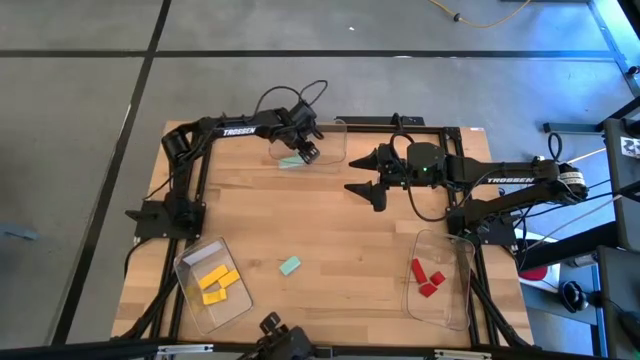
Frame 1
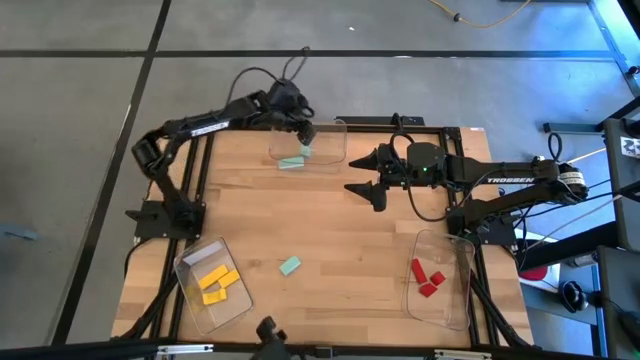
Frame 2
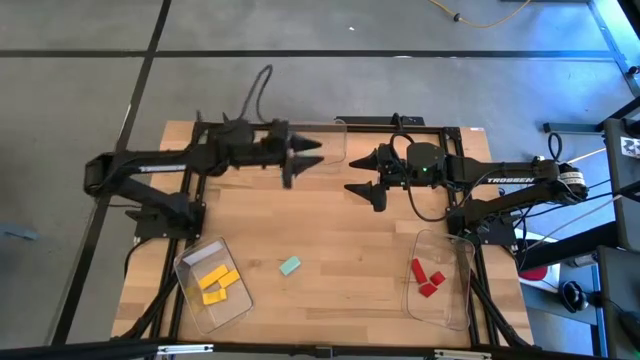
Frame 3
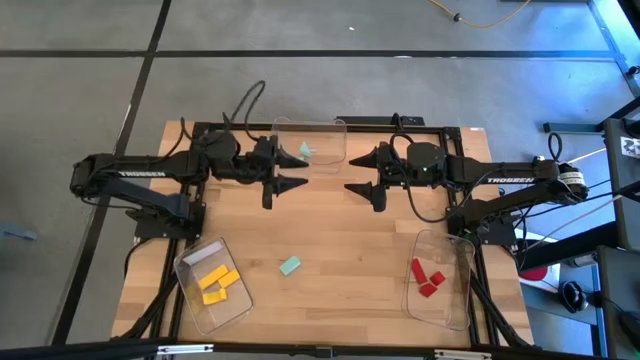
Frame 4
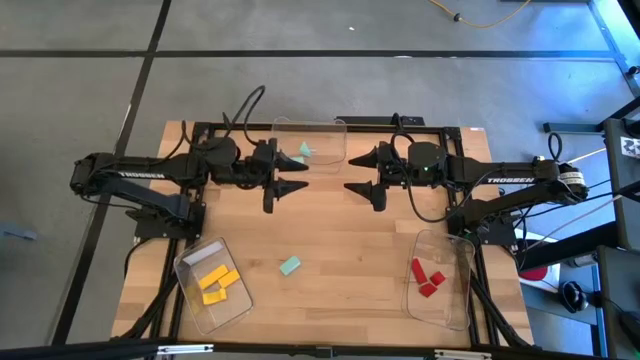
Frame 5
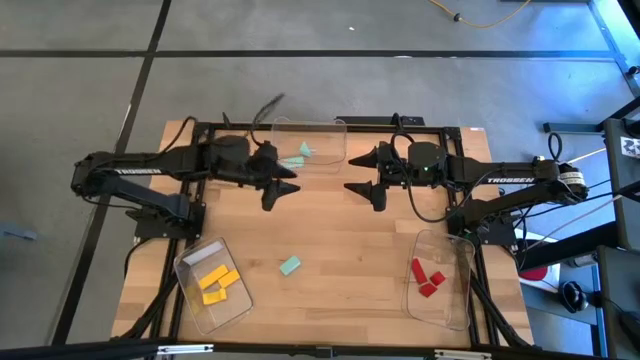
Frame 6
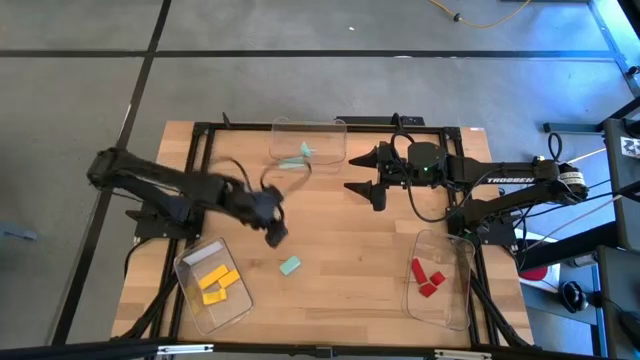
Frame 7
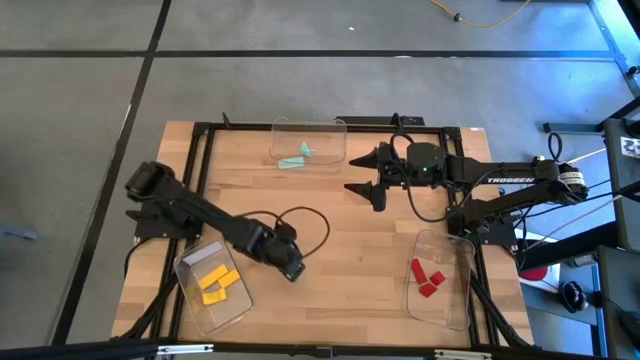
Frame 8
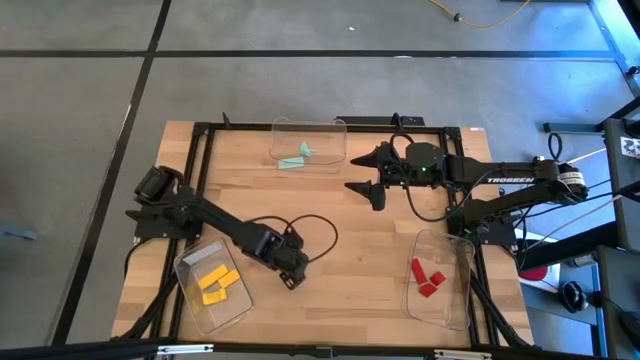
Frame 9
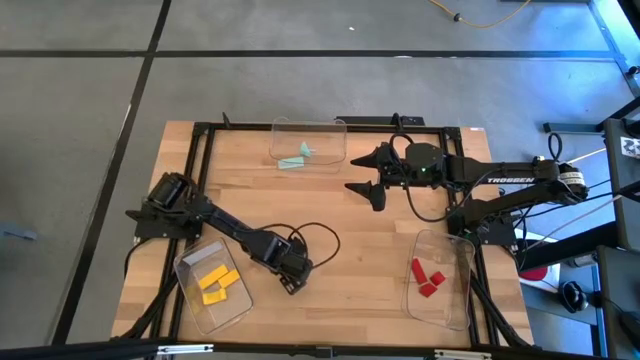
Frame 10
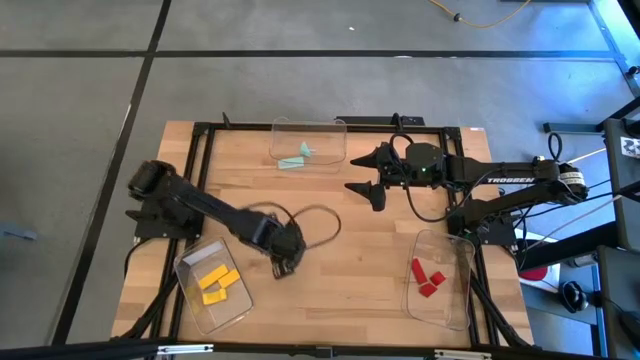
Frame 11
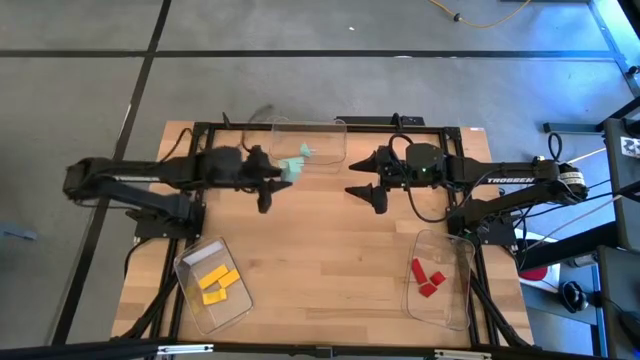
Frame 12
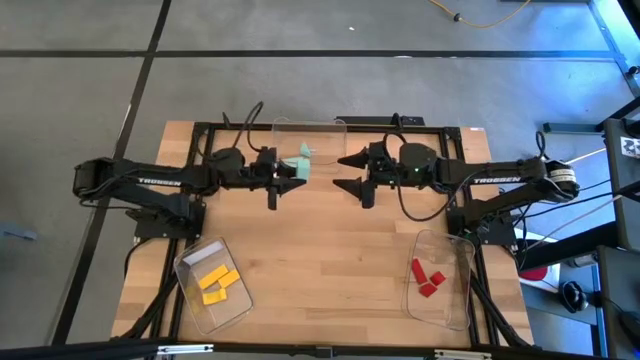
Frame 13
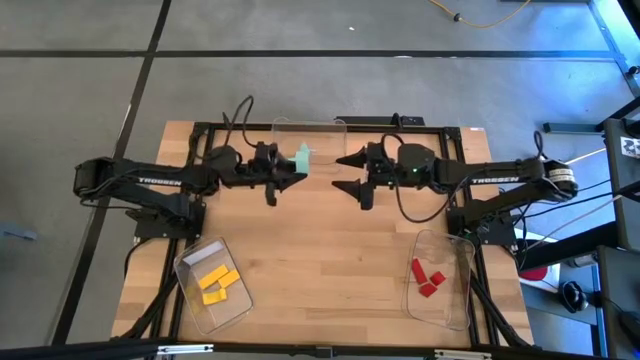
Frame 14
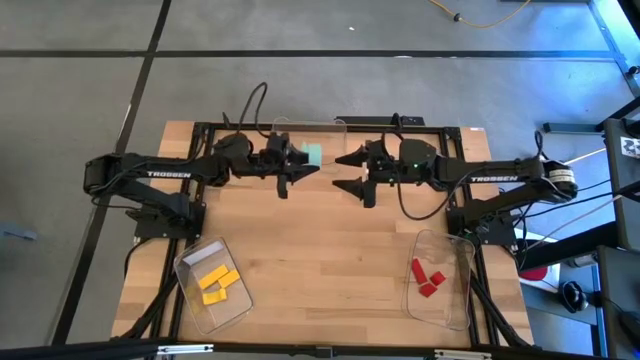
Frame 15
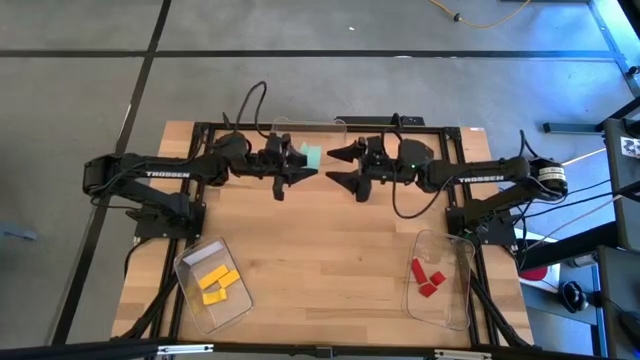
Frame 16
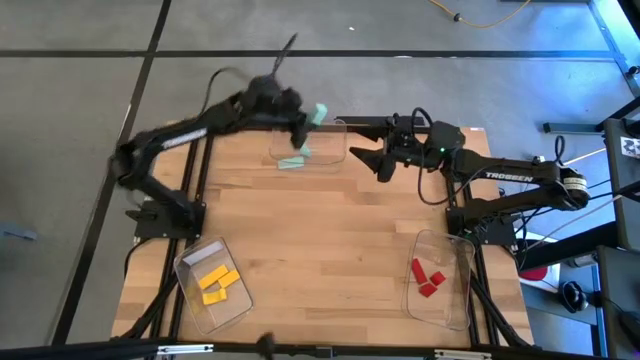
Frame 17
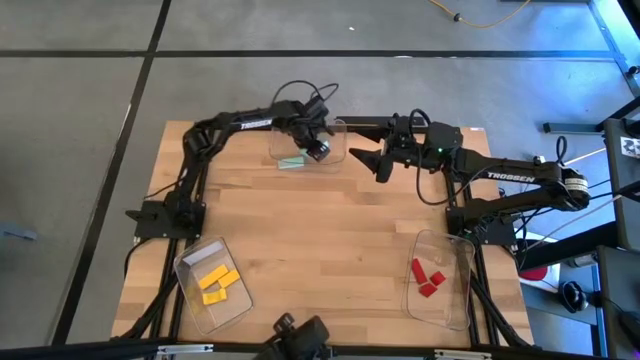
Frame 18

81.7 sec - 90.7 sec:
Task: Sort & place blocks by color
Put the blue block into the top center transparent bin

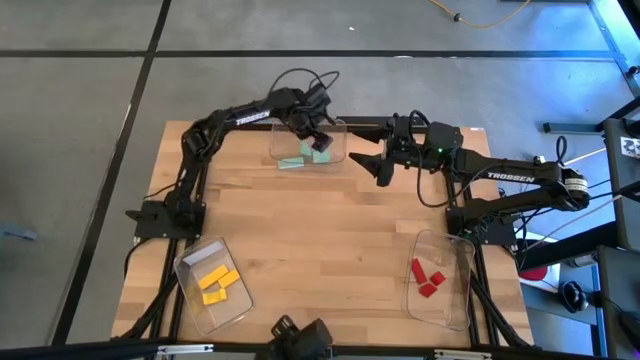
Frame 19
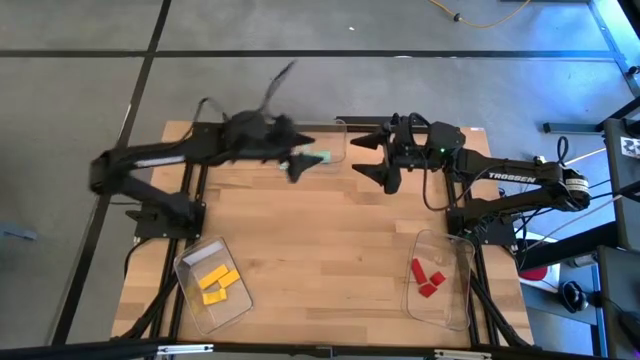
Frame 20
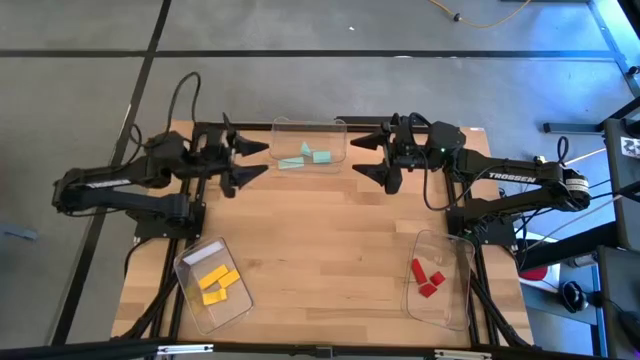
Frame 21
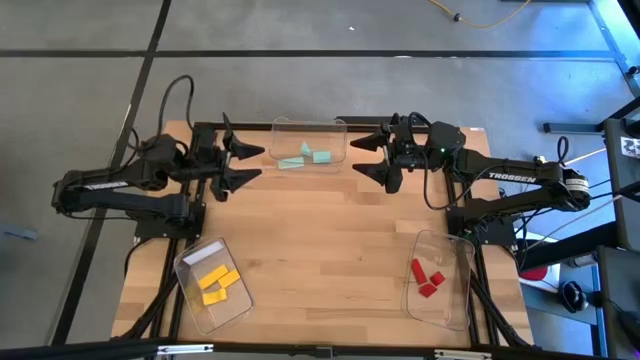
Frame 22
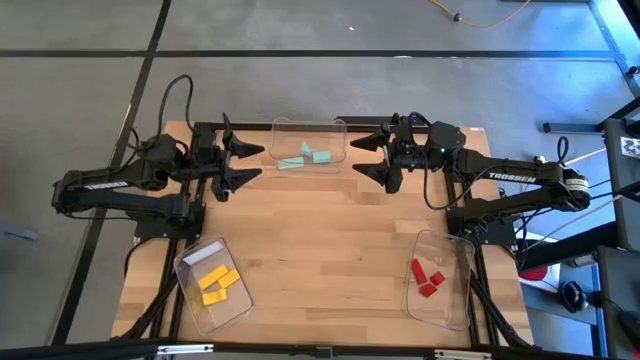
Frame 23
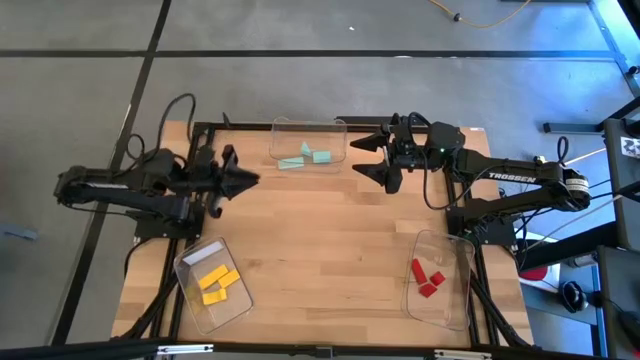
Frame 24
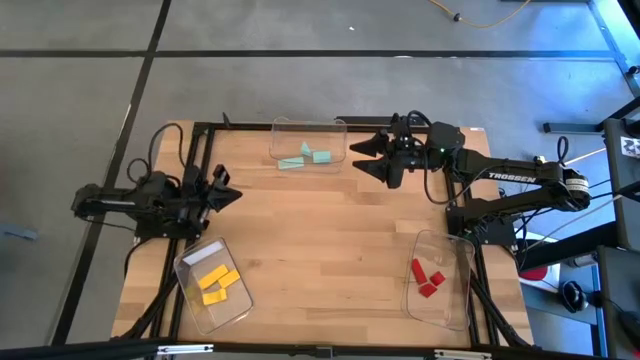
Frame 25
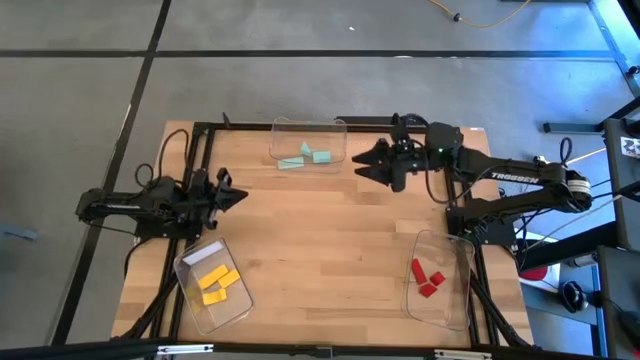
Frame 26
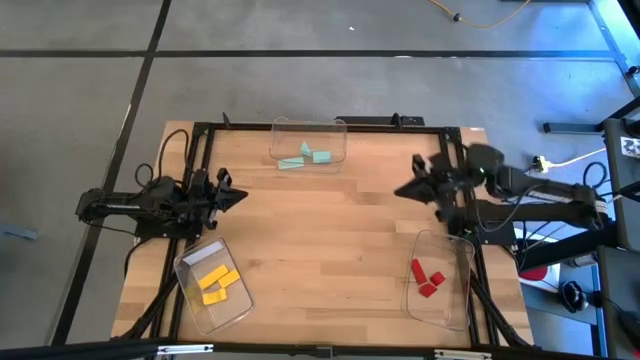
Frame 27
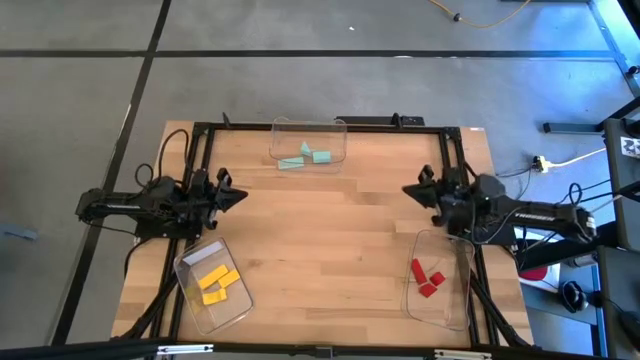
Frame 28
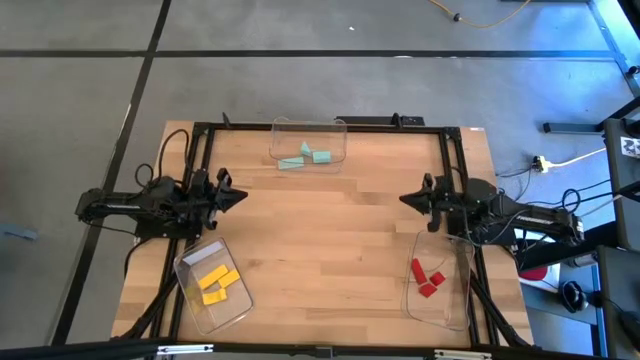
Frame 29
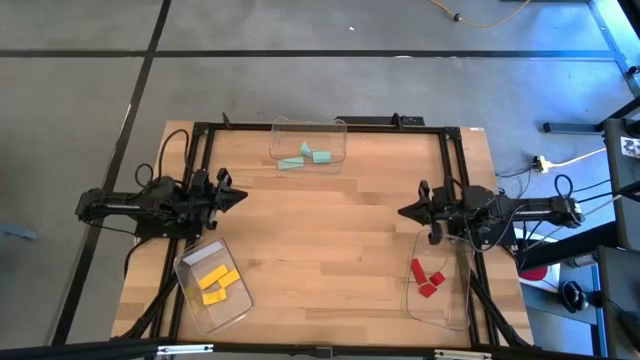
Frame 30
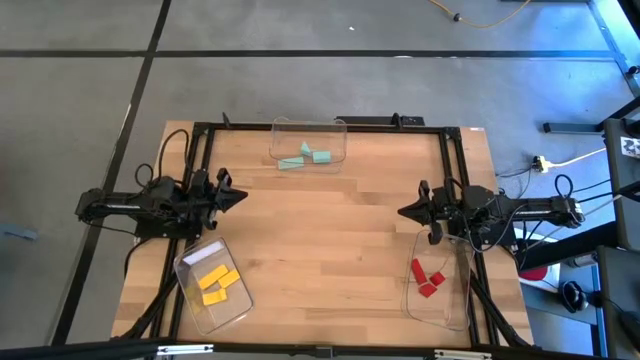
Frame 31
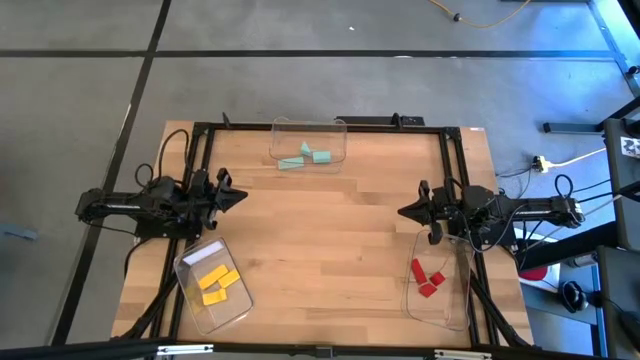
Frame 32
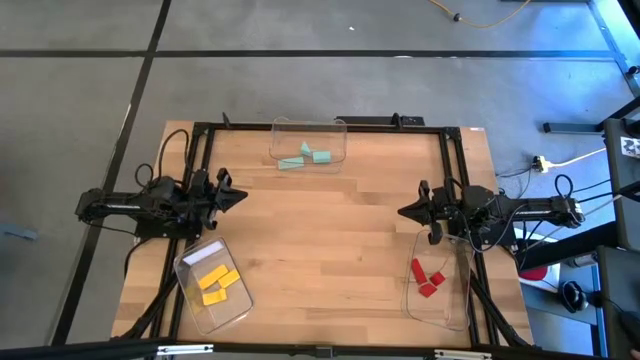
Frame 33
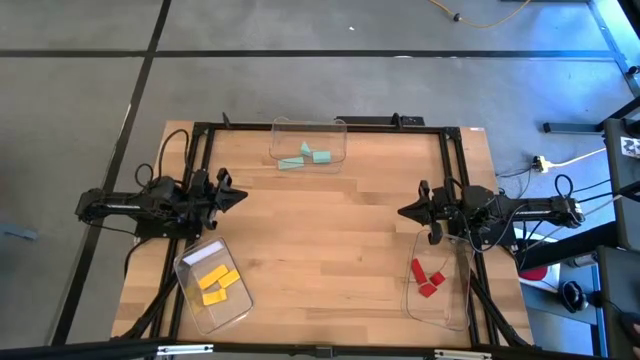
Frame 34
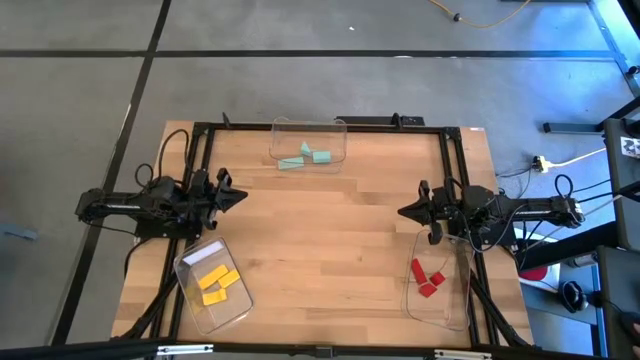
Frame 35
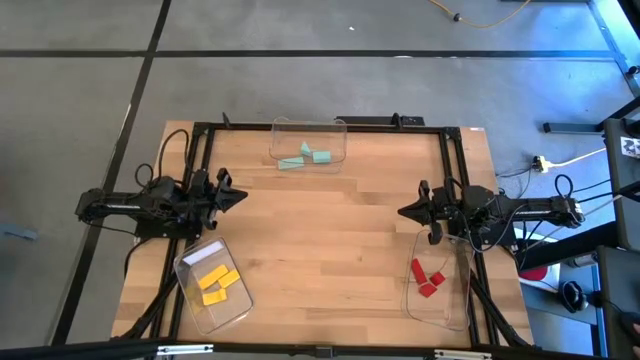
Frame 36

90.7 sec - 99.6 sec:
Return to Home Position

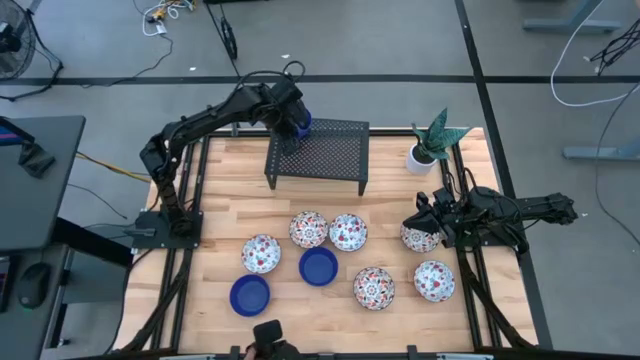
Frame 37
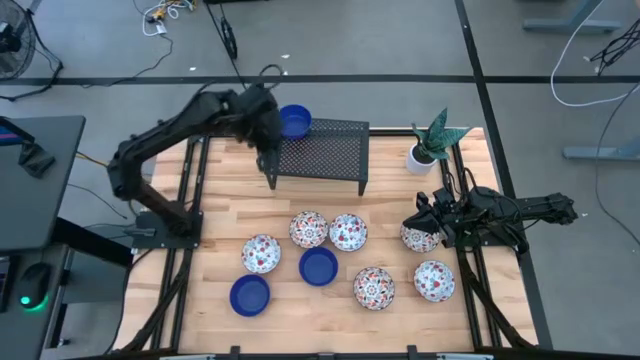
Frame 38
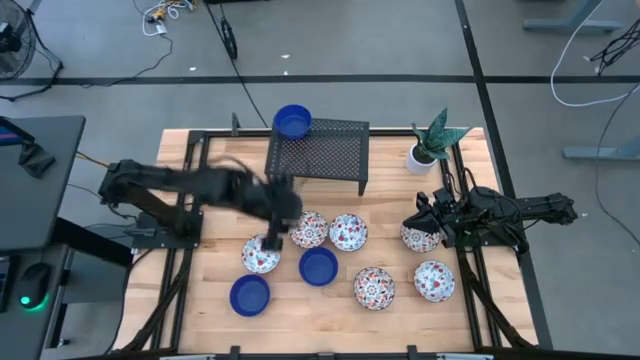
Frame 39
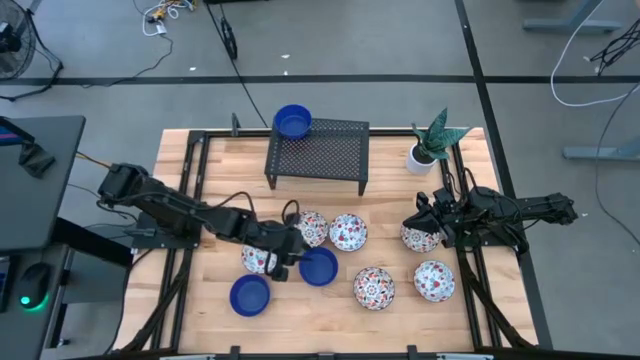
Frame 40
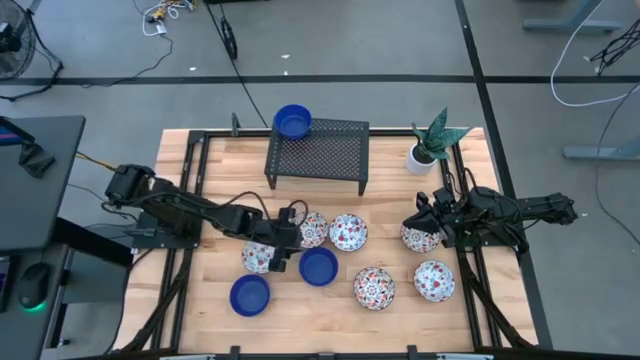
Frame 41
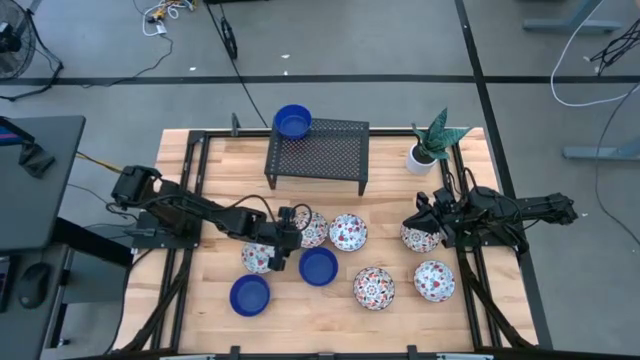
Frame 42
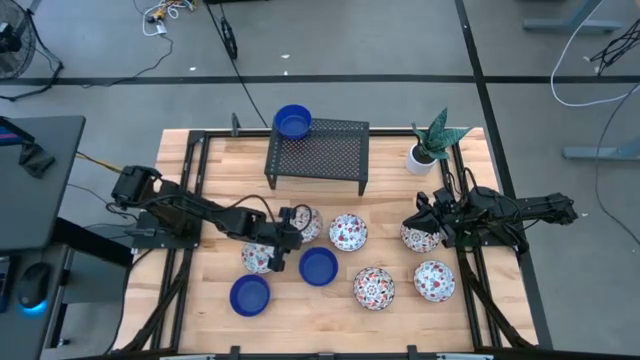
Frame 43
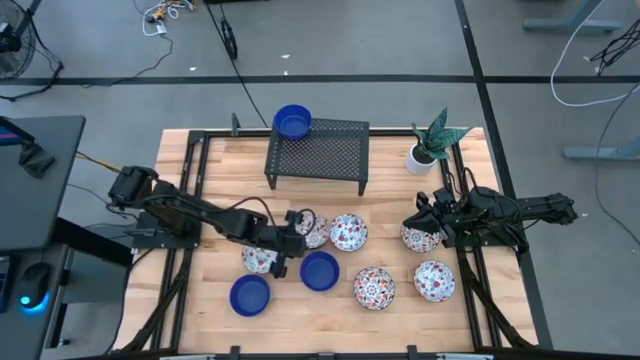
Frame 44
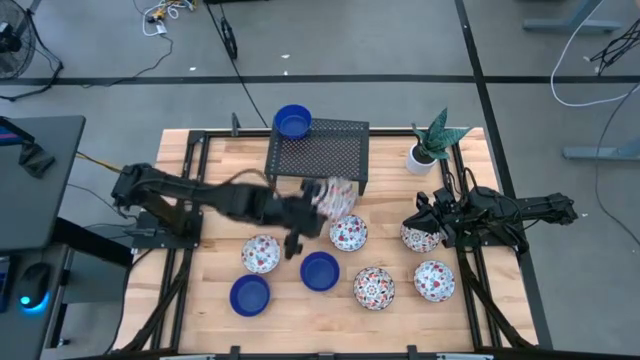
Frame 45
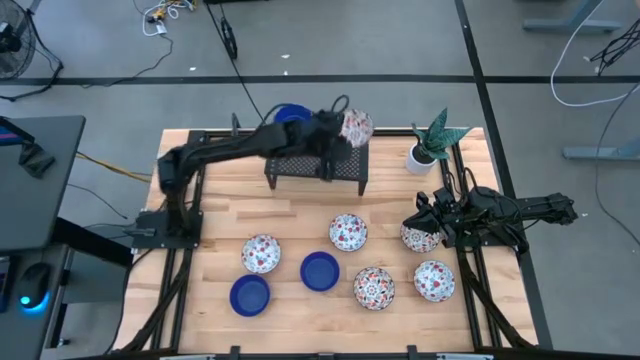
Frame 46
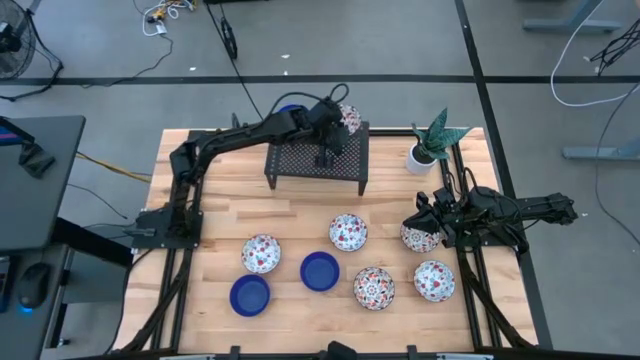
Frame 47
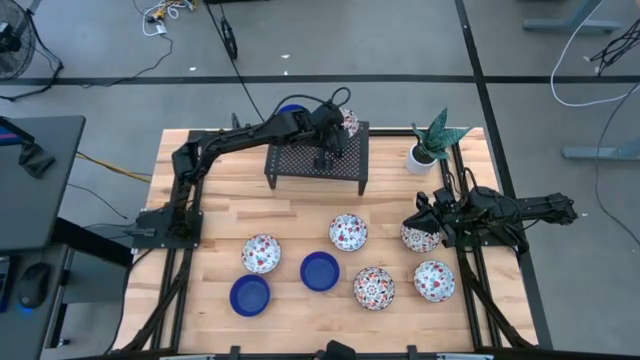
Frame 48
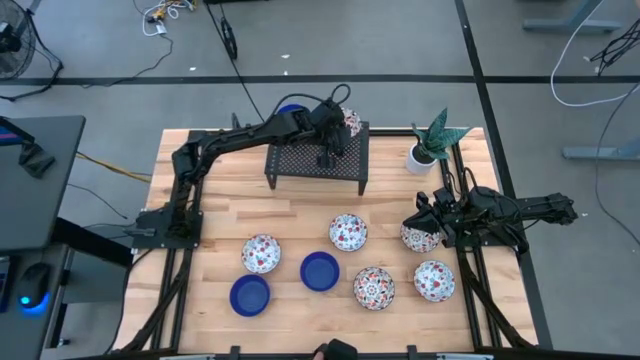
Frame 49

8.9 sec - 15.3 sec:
Task: Pick & Place Mini bowls
Put the top left orange bowl on the shelf
